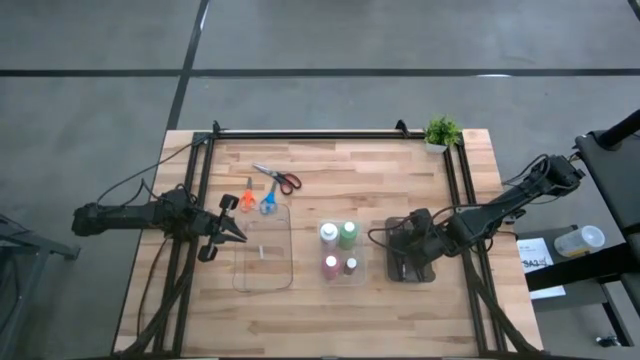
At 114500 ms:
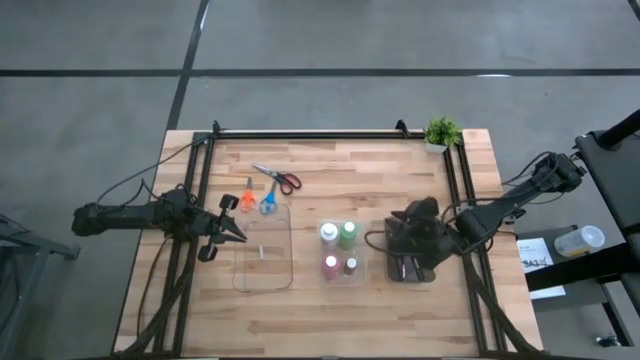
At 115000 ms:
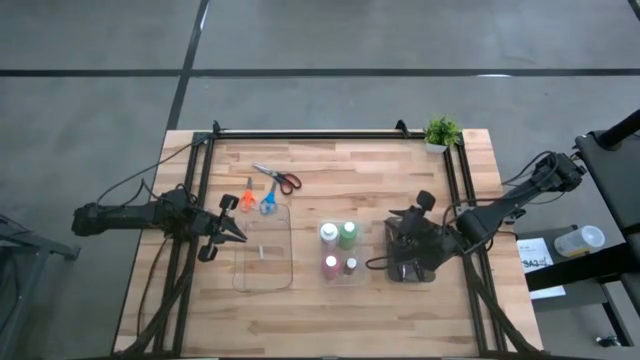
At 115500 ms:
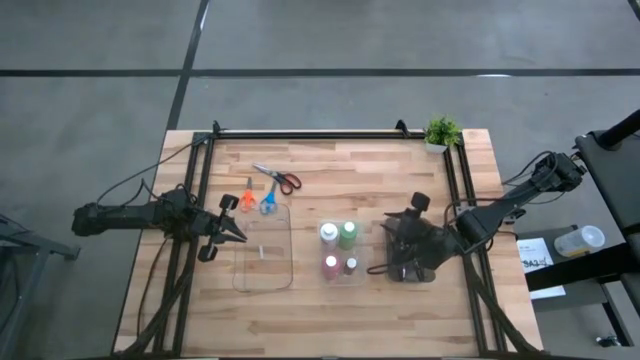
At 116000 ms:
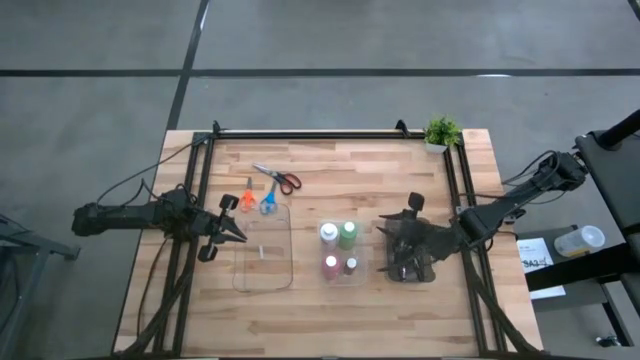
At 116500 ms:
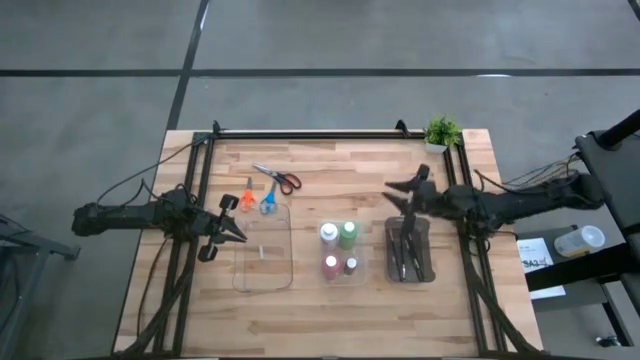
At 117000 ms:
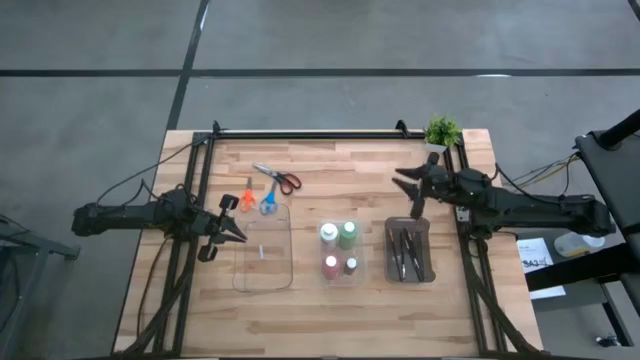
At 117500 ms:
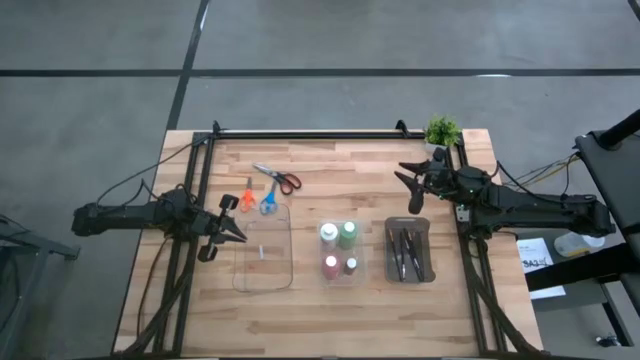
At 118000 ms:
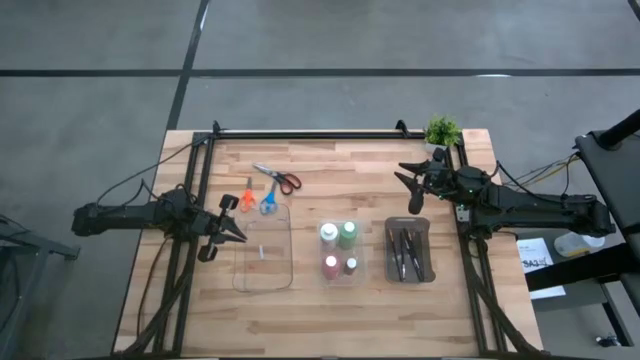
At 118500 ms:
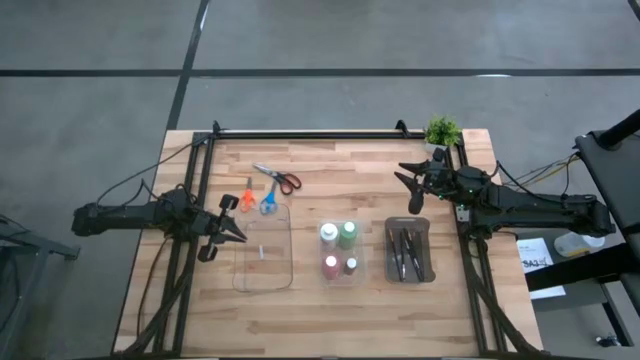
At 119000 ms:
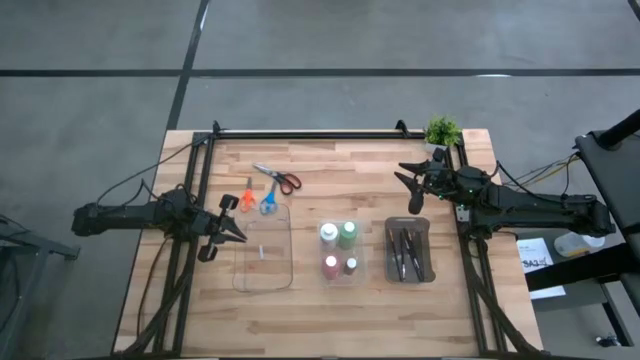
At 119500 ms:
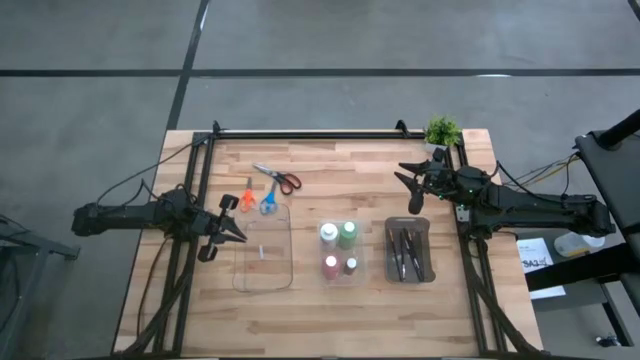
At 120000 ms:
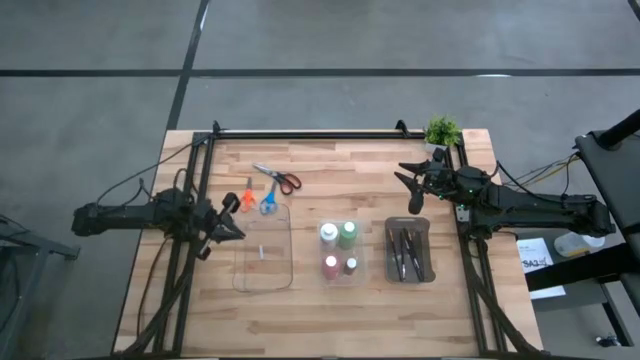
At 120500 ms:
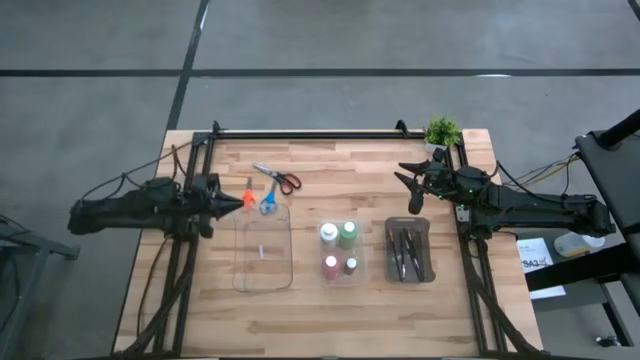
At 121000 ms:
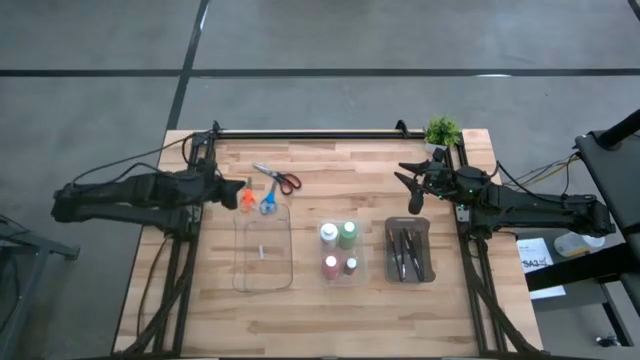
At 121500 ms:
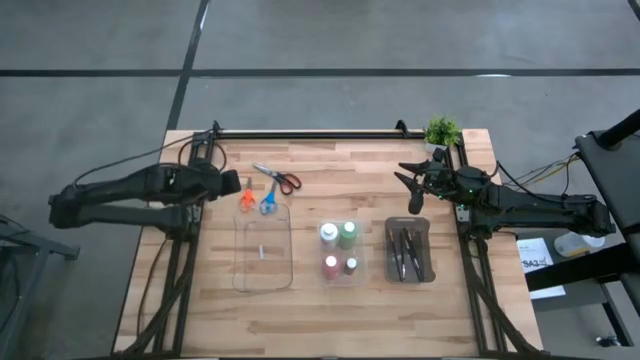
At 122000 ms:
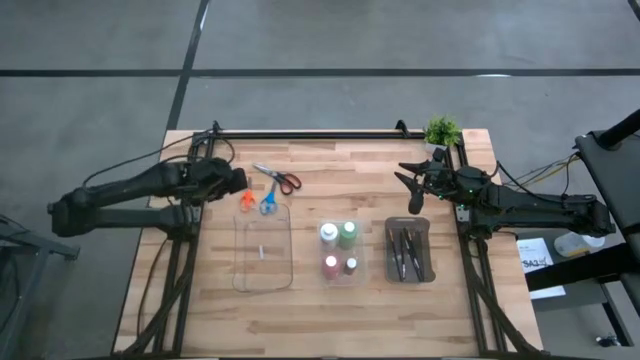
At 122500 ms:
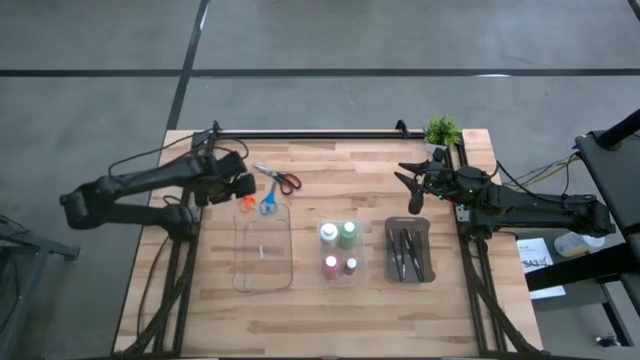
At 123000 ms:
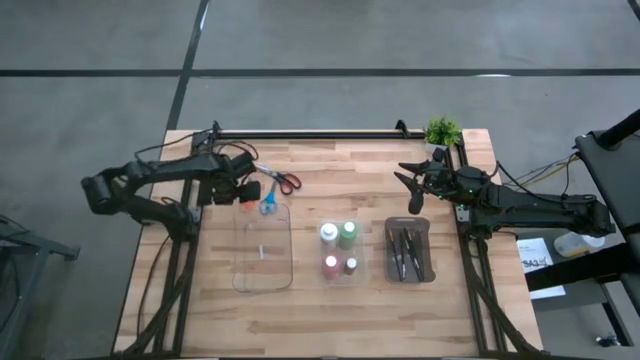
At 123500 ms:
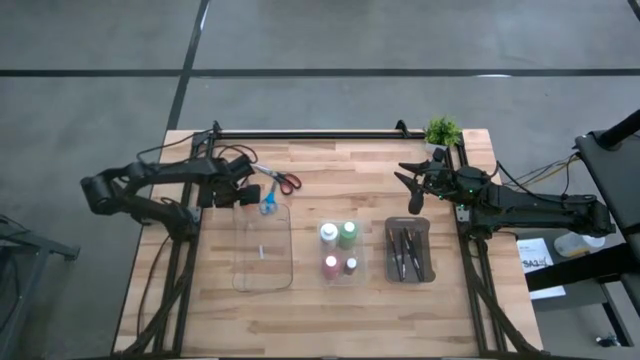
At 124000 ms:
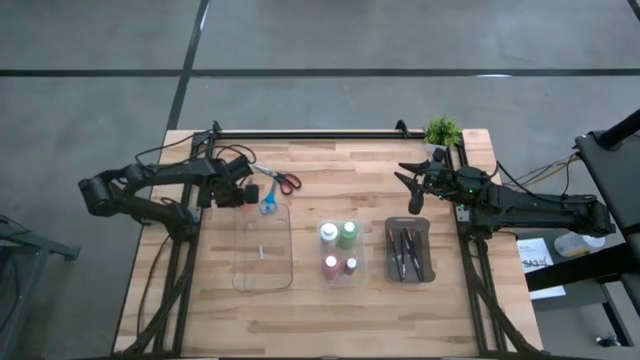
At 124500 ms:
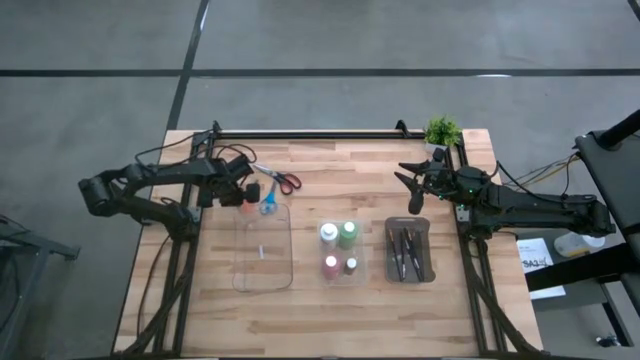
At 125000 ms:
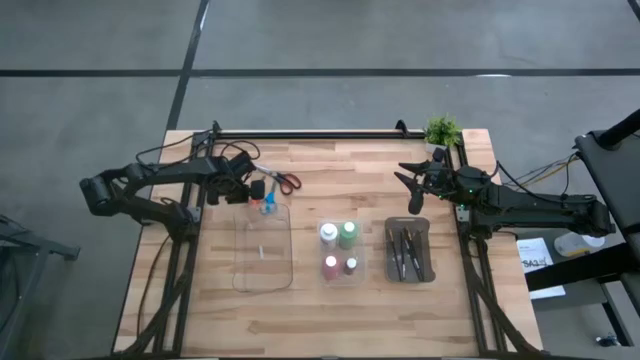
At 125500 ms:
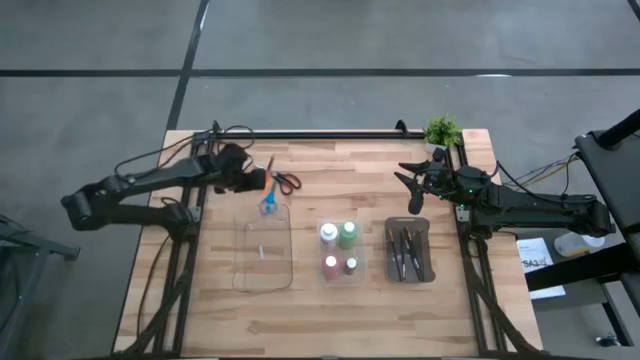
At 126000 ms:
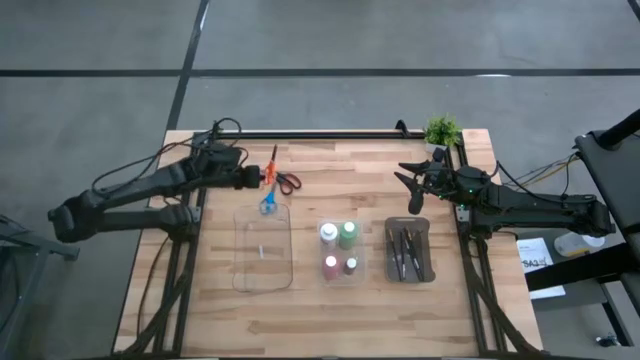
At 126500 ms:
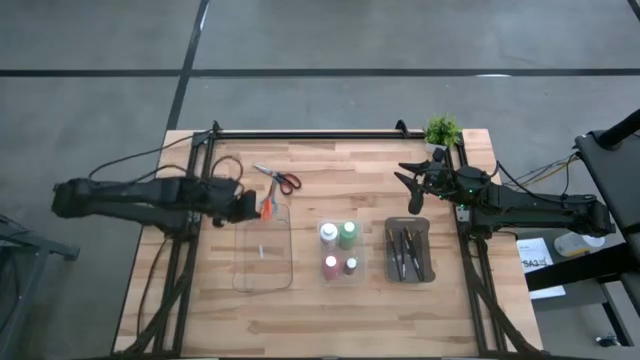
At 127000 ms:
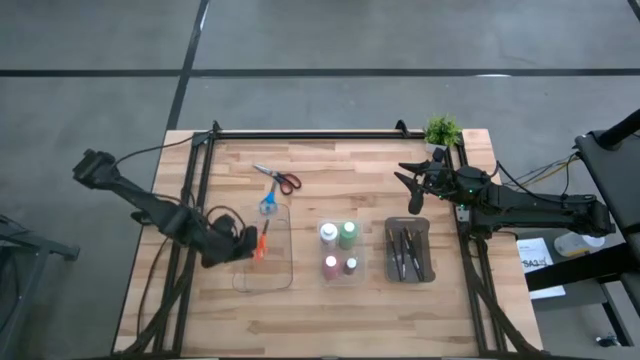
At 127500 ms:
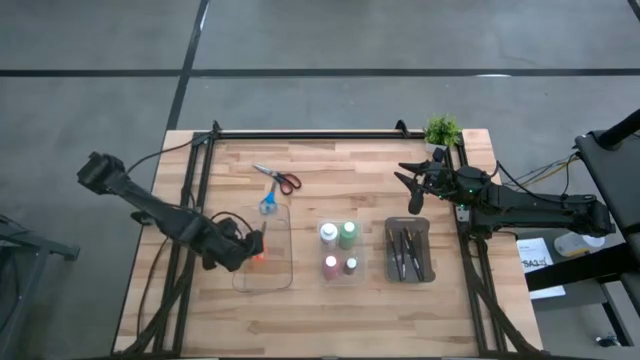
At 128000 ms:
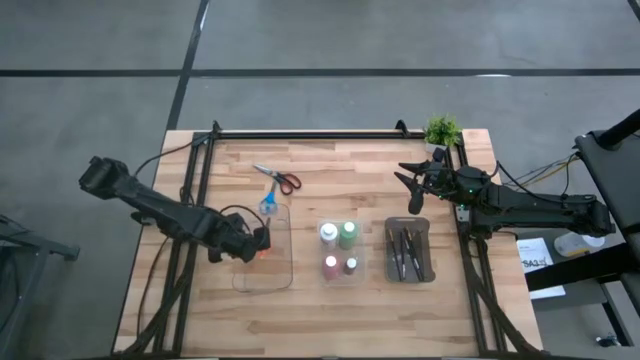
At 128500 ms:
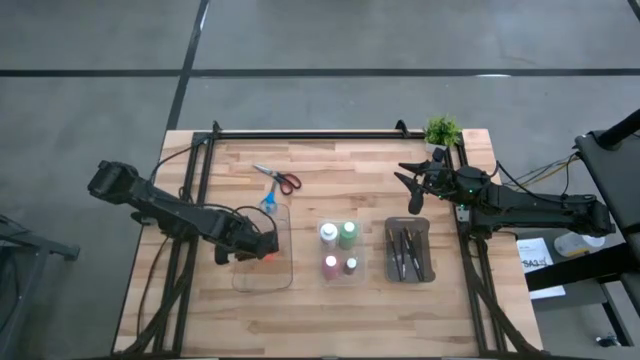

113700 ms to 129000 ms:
Task: Pick & Place Paint Supplies
Put the orange scissors into the transparent bin

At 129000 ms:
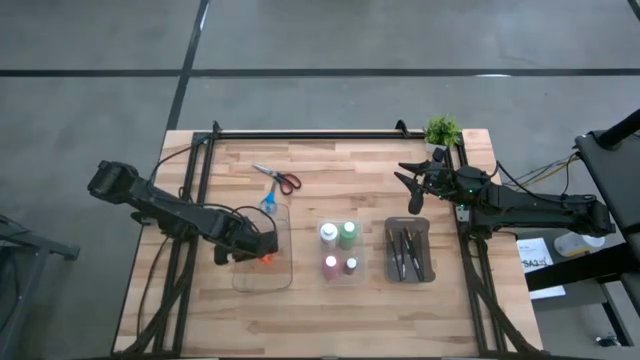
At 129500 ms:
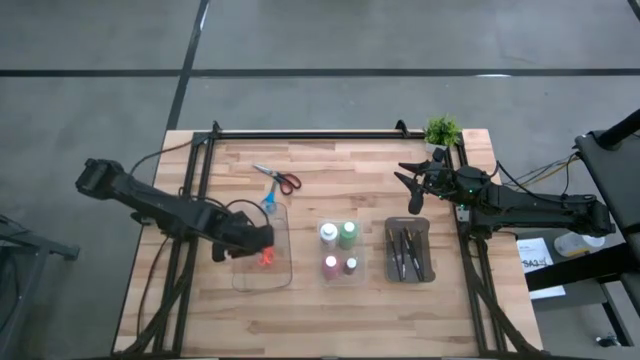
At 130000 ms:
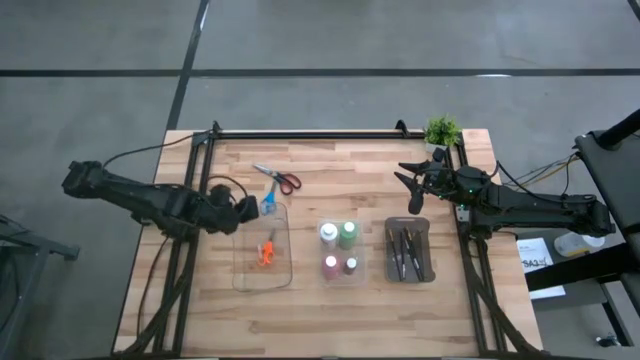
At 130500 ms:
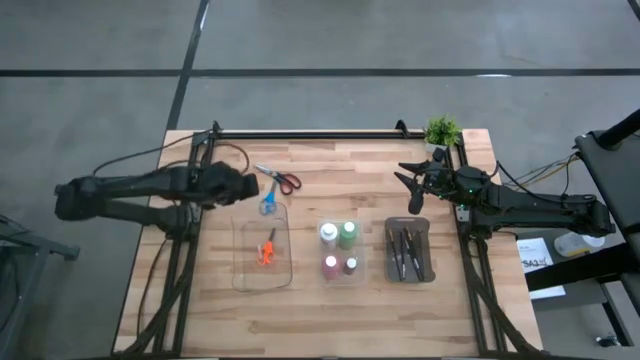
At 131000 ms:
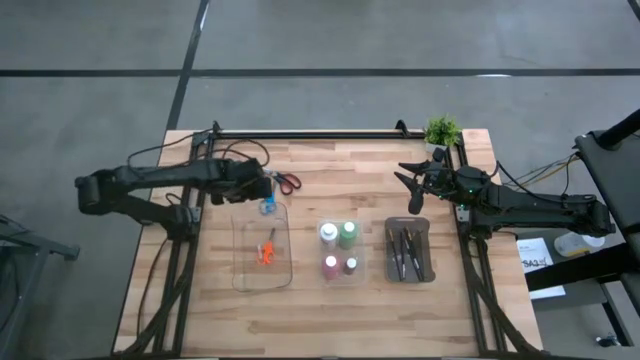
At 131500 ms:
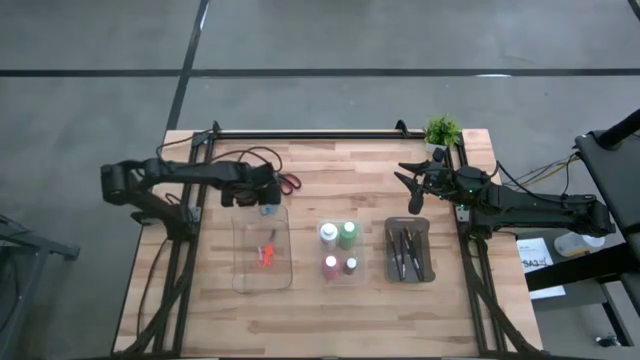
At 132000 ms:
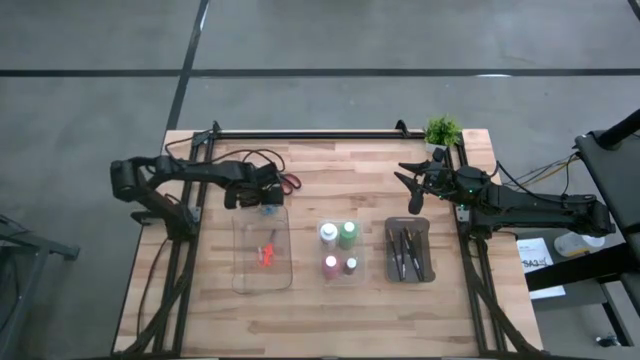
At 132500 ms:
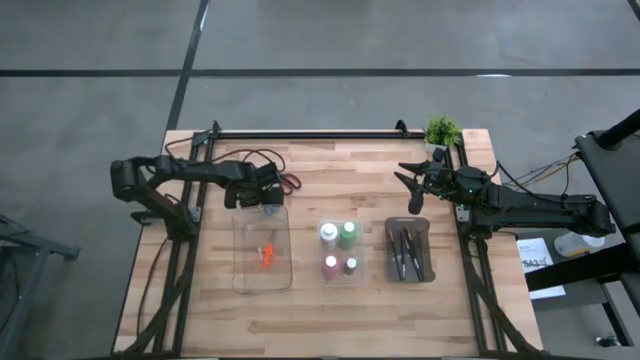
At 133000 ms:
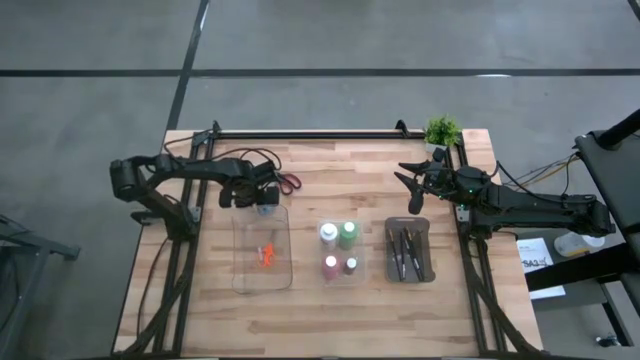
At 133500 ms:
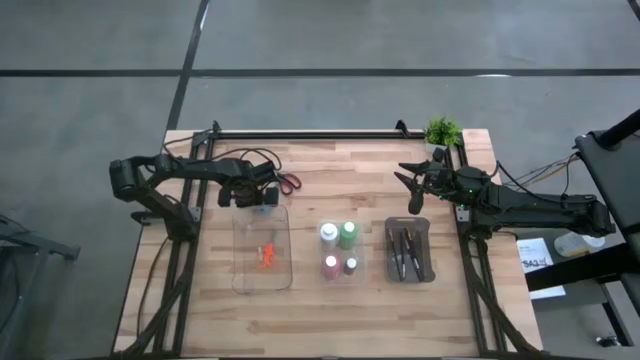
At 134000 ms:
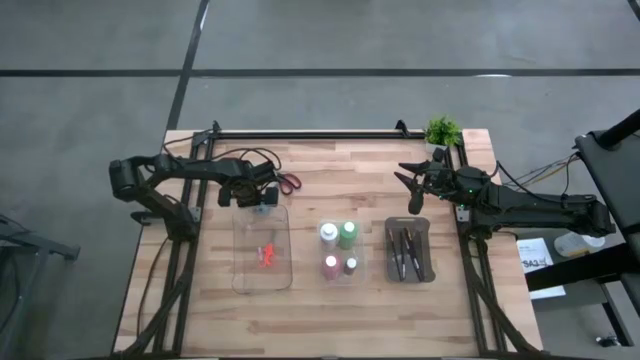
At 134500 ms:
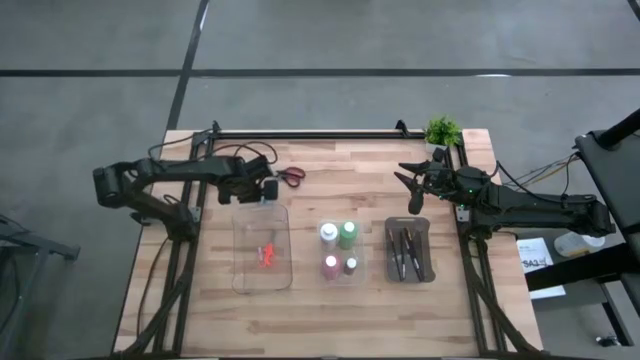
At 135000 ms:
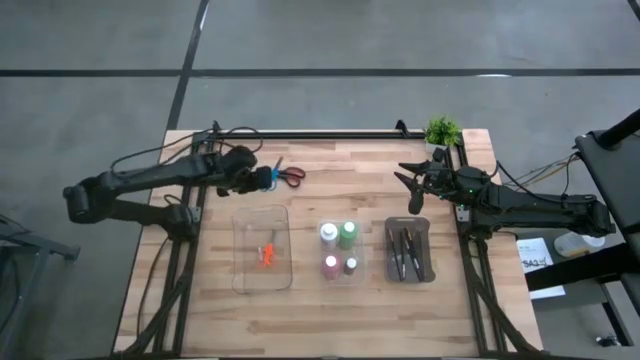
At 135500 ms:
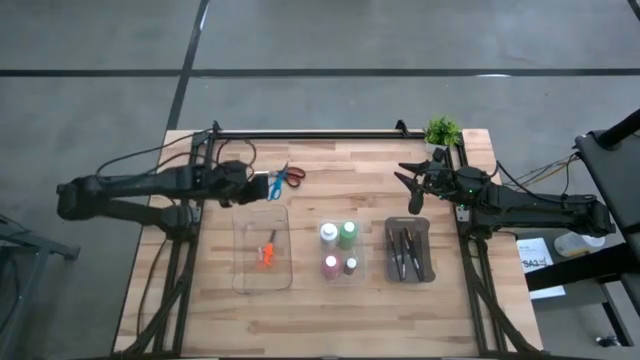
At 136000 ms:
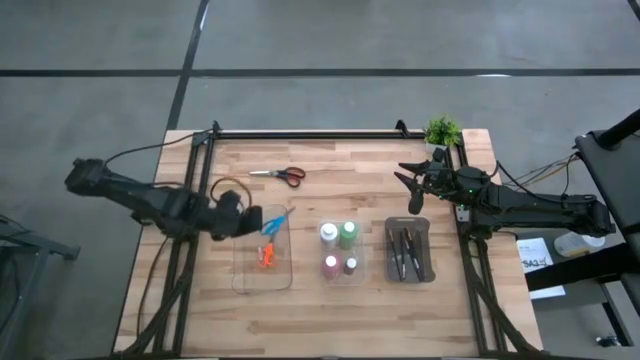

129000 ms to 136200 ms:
Put the scissors into the transparent bin
